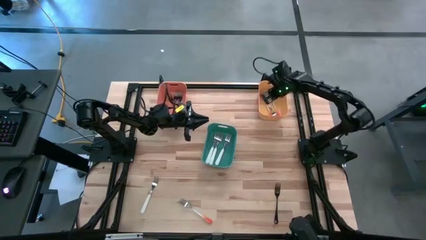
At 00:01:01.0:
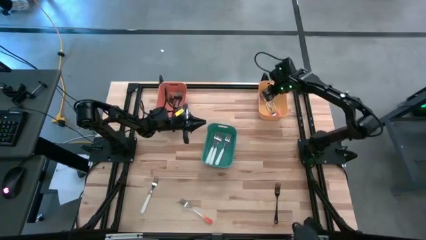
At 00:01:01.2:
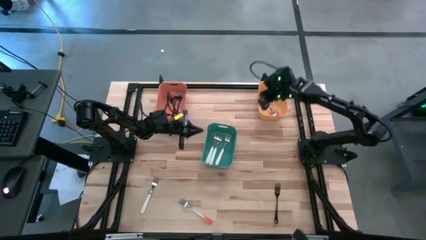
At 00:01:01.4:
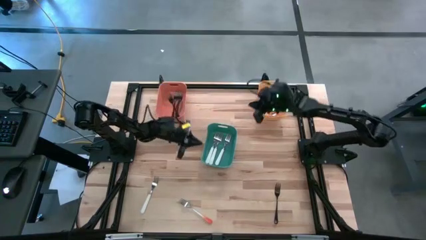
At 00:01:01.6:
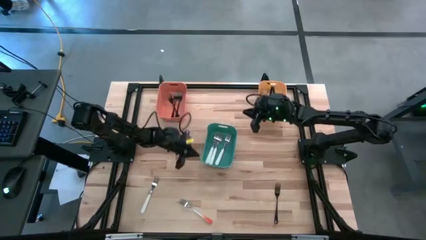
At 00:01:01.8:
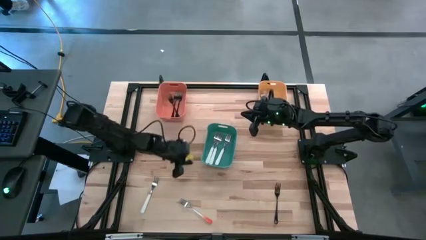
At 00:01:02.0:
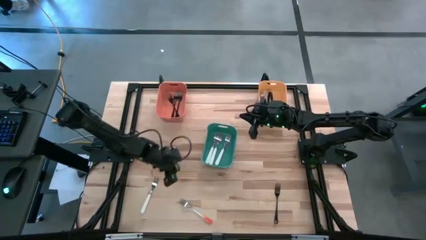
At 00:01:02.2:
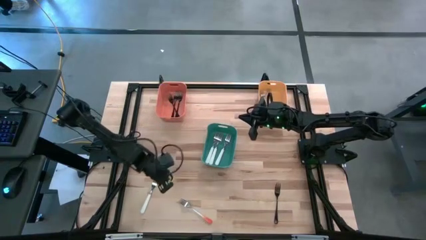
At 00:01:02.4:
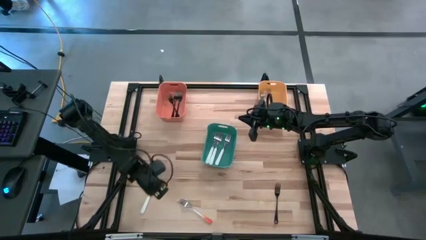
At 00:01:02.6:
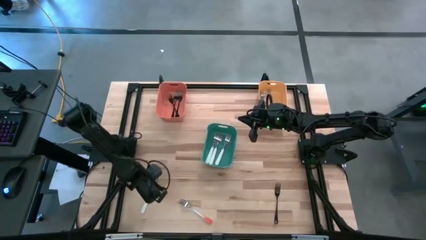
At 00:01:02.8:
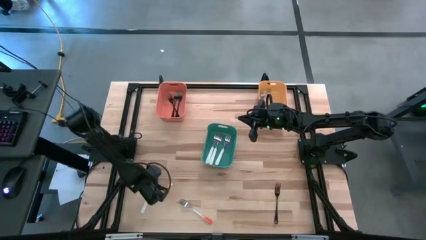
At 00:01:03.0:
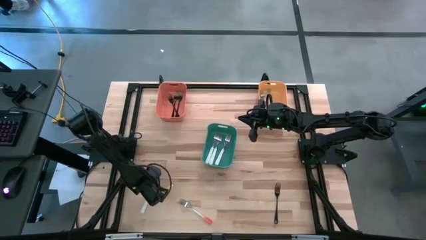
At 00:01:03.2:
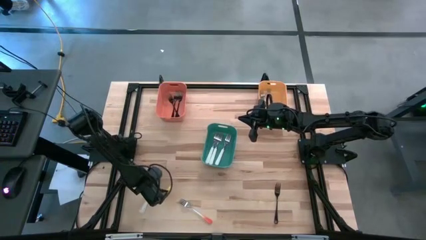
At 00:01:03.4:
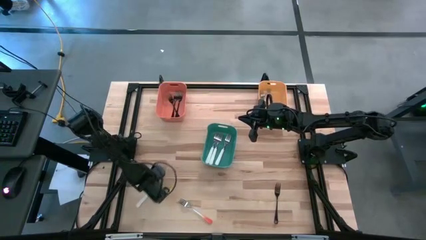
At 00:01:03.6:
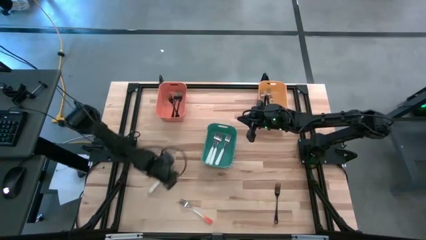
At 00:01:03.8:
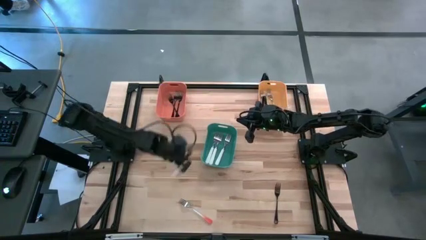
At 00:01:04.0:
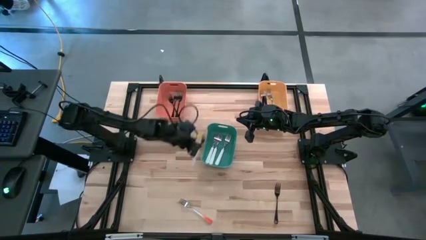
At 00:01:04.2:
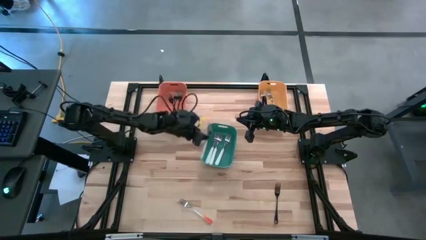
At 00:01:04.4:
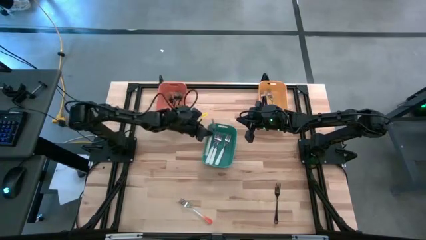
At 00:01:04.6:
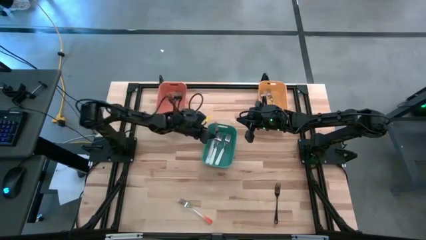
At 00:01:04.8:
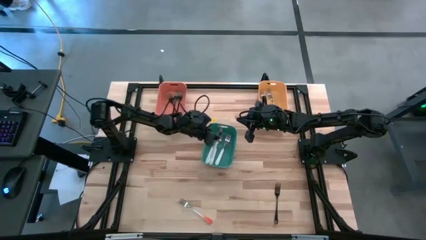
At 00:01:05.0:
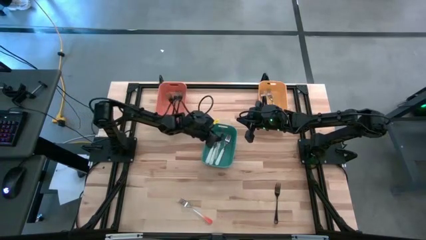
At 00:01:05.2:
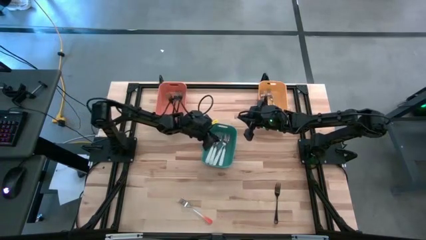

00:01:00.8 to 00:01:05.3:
Task: Sort silverware by color (type)
Put the white fork into the green bin

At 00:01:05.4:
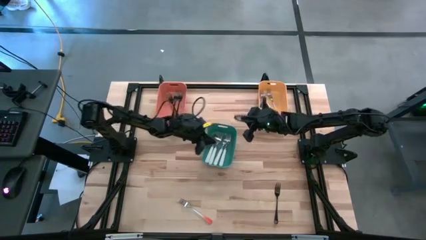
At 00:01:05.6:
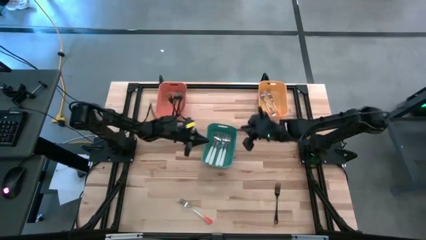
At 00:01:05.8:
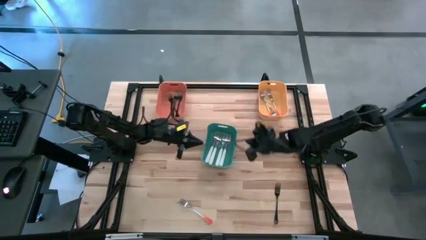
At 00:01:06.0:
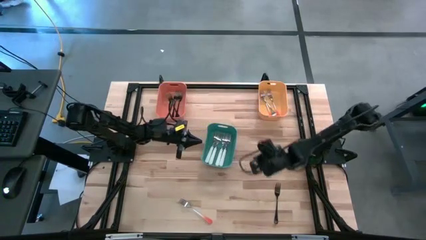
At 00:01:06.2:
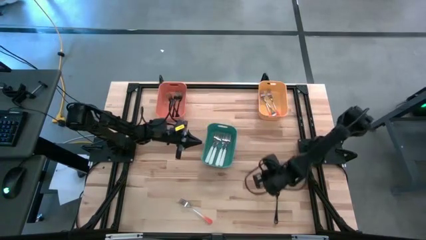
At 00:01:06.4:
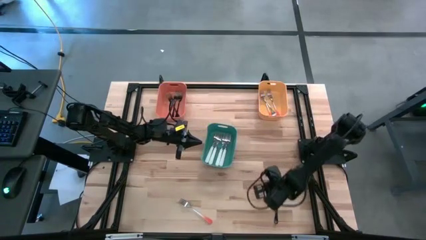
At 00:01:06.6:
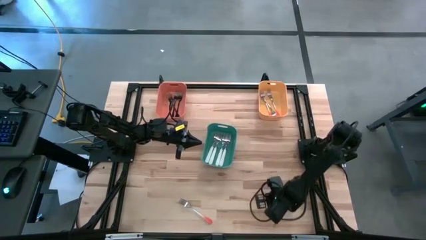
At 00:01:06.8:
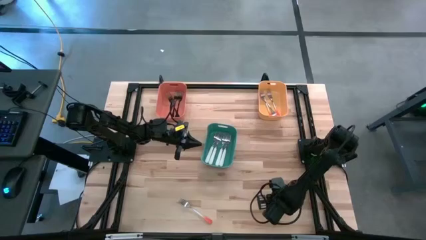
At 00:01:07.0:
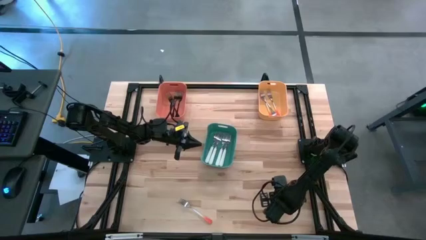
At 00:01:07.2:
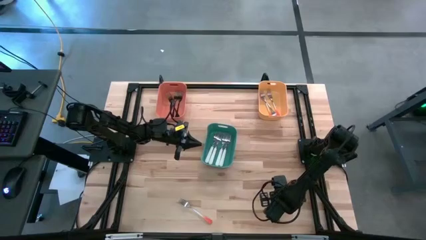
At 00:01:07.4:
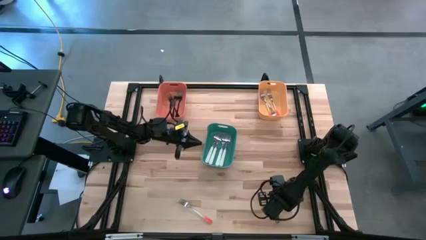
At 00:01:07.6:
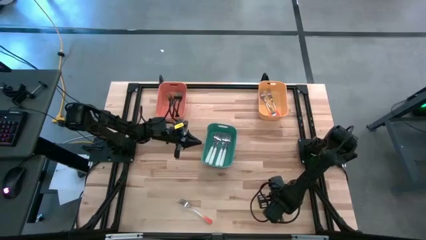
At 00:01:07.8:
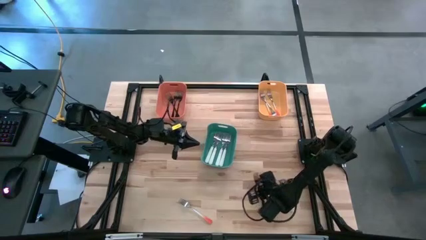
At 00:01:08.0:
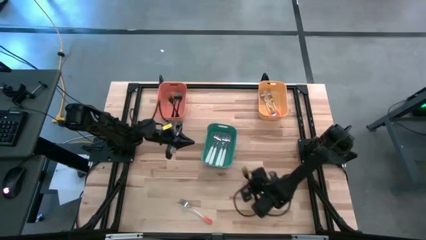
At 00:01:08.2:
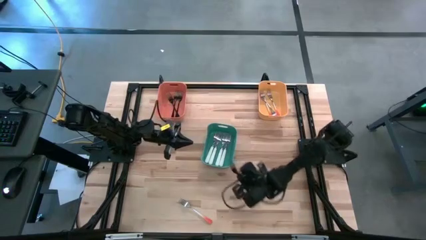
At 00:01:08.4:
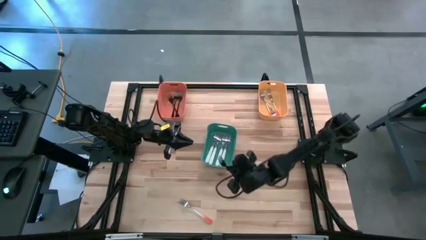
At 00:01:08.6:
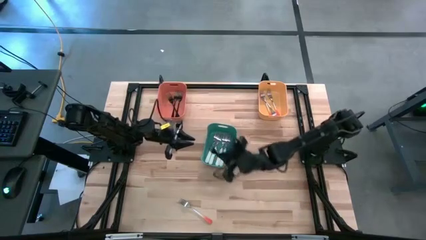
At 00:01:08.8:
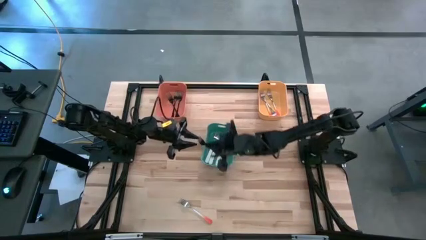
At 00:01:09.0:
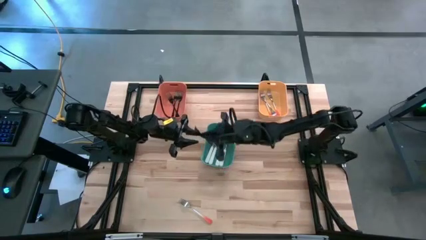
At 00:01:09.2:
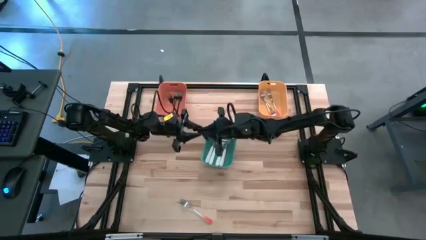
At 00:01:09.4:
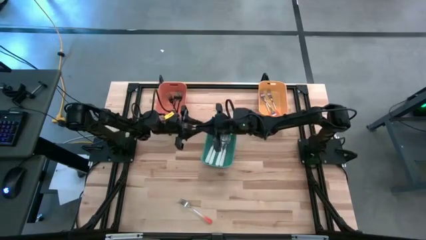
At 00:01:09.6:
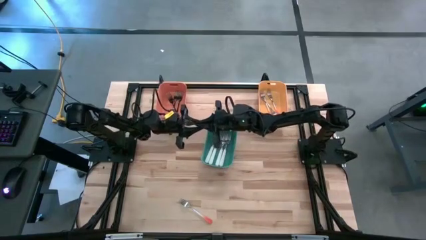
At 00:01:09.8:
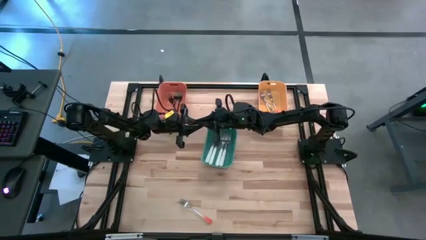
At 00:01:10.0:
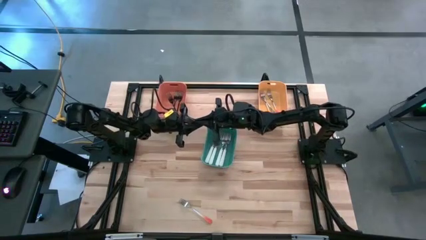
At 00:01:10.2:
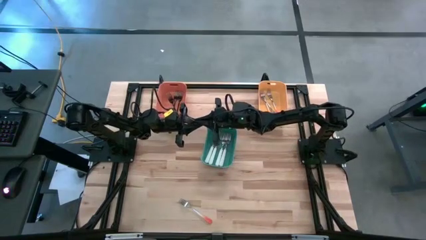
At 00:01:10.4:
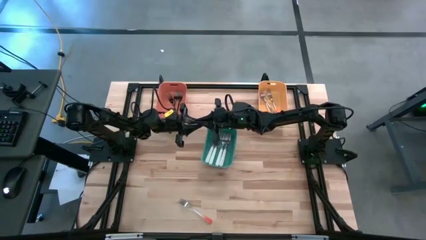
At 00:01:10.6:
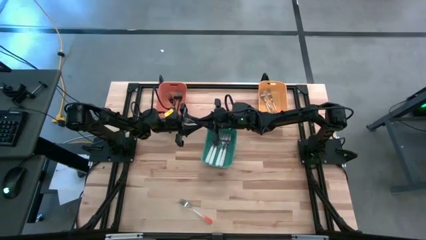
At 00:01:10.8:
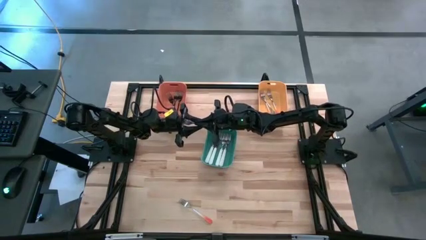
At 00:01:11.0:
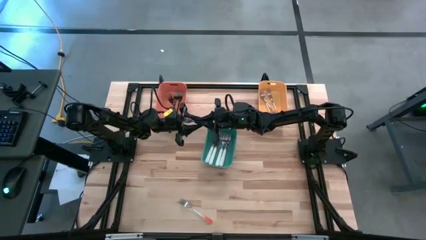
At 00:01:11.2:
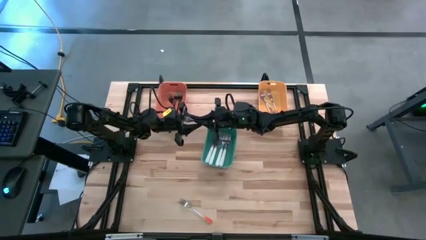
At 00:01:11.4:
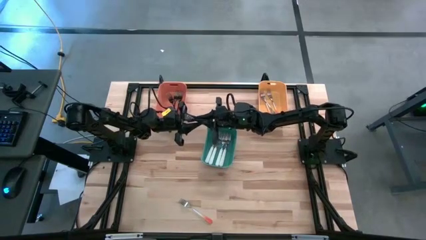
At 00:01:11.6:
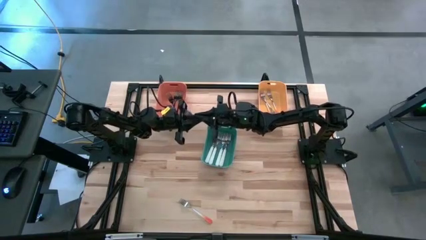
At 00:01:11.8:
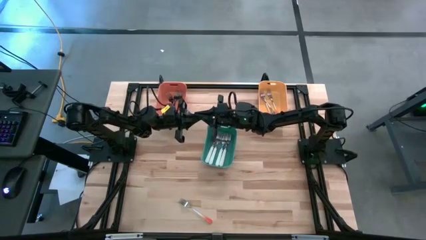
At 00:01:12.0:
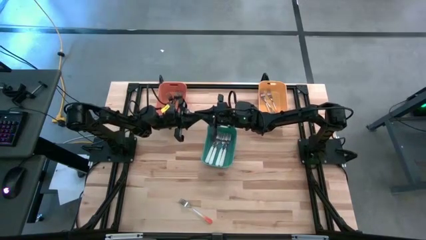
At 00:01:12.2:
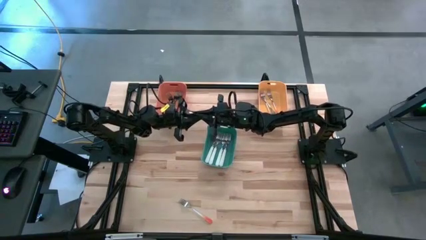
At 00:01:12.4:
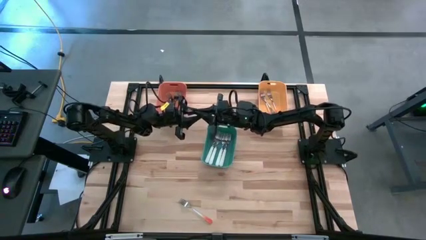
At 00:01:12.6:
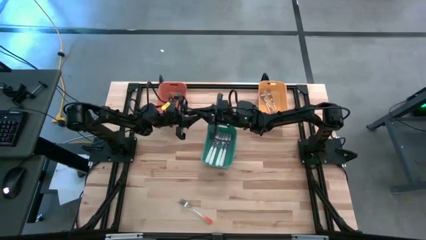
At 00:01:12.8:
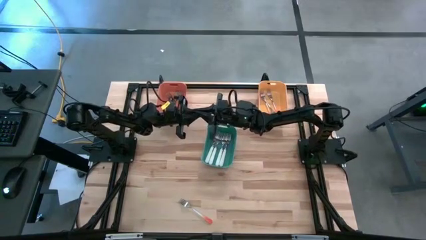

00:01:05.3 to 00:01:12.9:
Put the black fork into the orange bin

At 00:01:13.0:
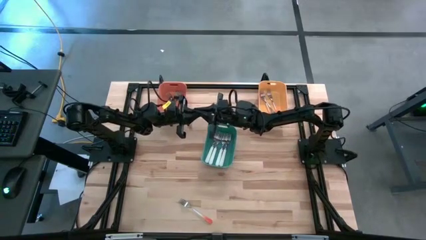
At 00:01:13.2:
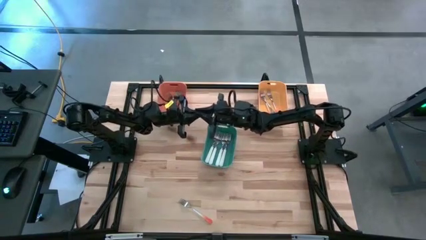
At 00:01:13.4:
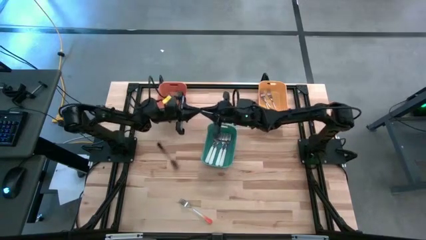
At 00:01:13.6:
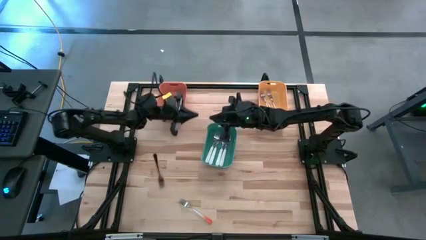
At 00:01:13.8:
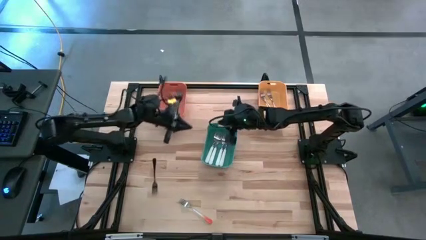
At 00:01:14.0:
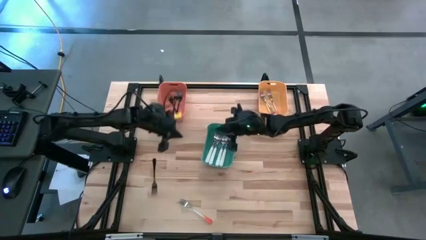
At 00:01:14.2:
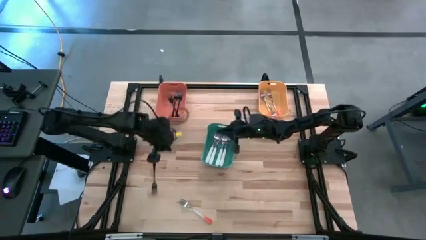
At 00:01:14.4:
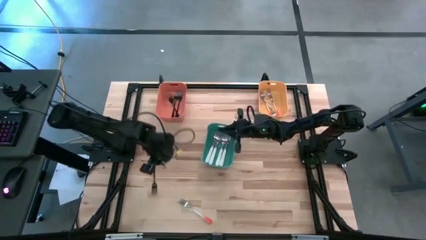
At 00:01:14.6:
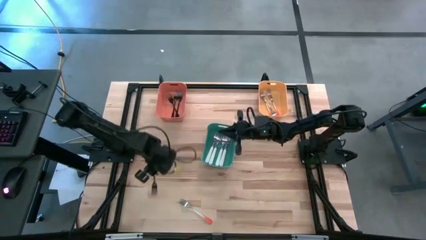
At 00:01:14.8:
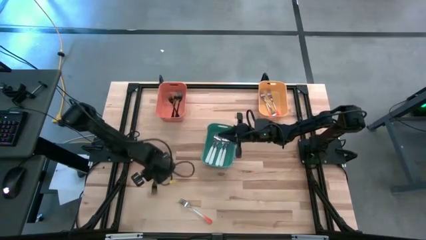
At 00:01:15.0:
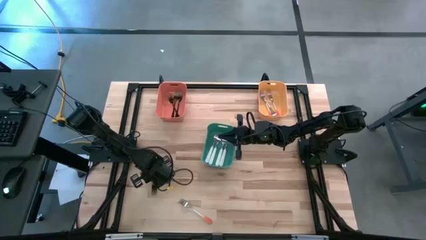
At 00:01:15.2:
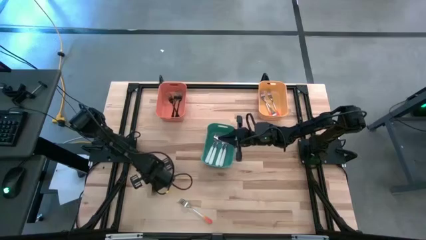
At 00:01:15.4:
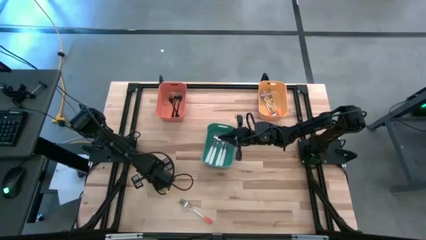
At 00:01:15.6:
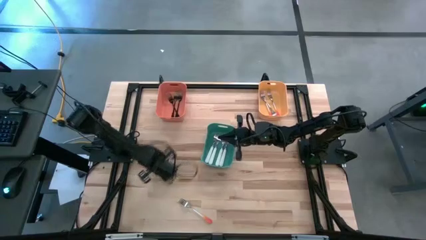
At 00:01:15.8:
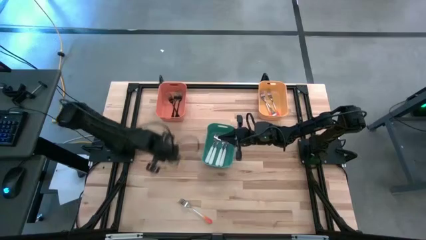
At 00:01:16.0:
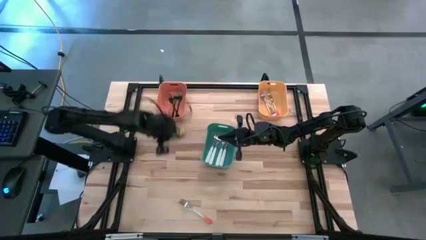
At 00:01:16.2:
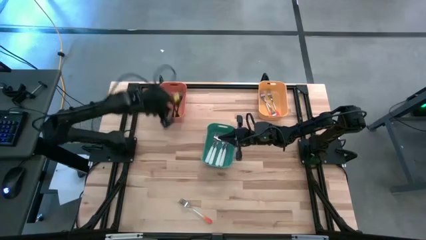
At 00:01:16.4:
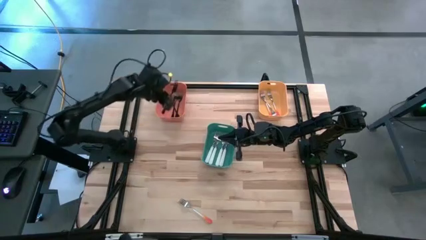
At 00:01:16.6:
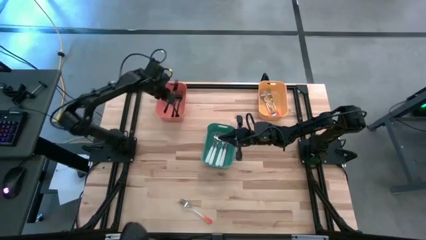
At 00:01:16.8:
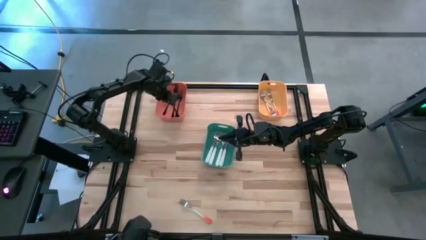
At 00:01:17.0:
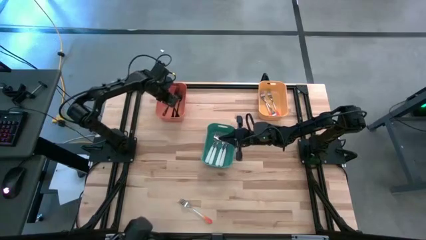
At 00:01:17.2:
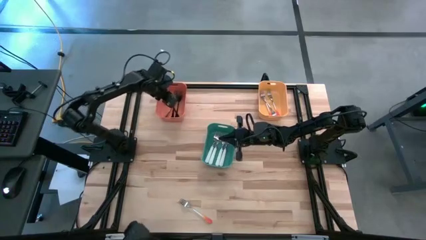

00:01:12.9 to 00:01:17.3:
Put the black fork into the orange bin
